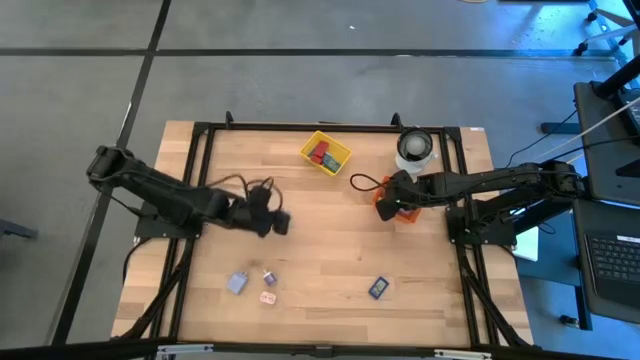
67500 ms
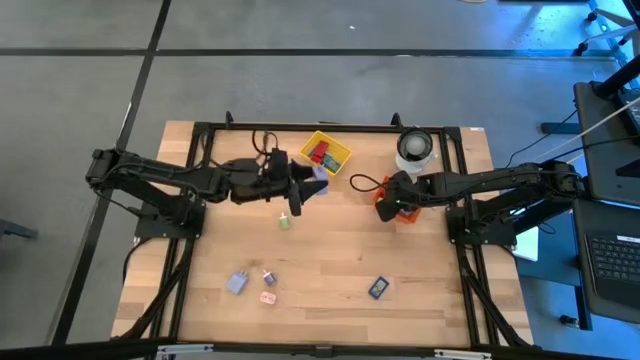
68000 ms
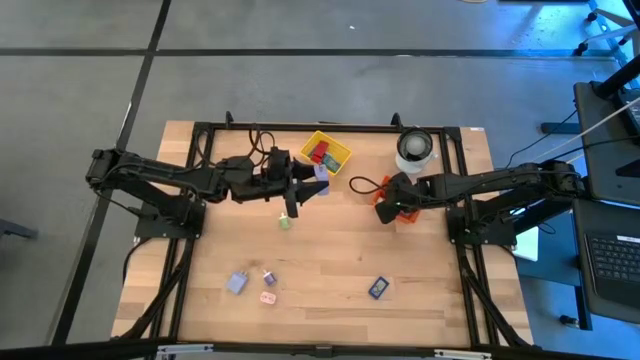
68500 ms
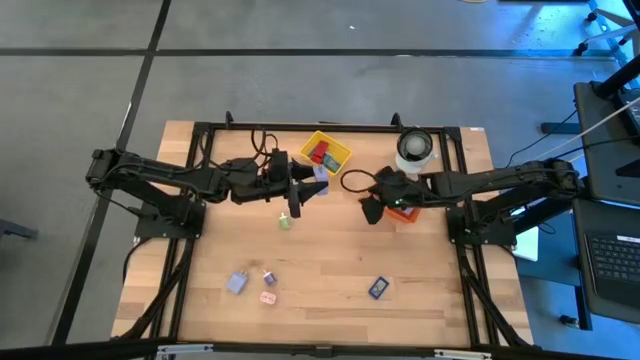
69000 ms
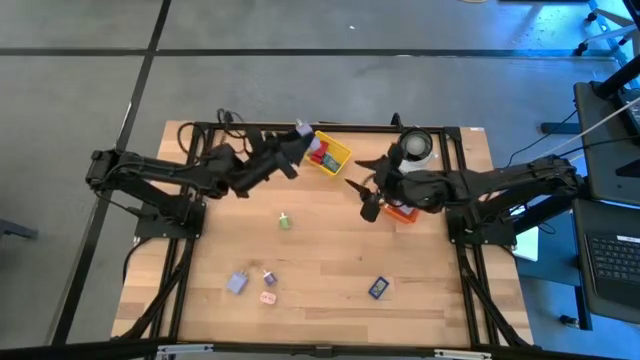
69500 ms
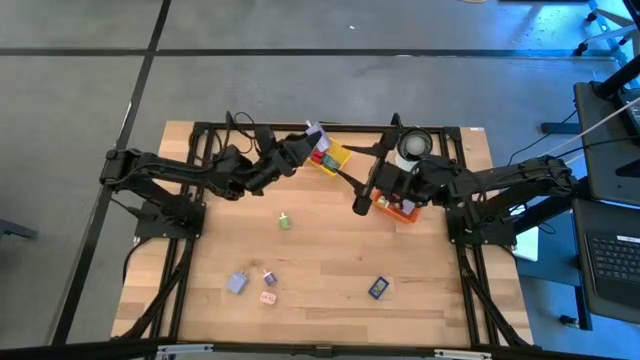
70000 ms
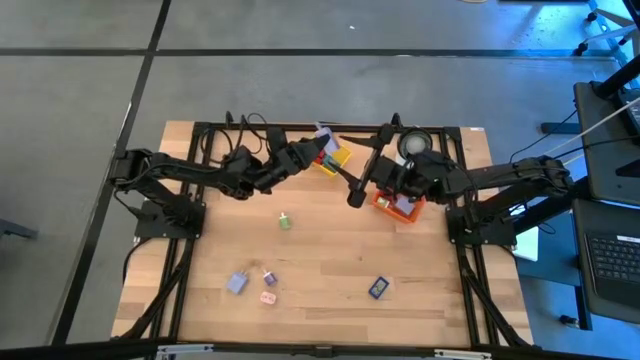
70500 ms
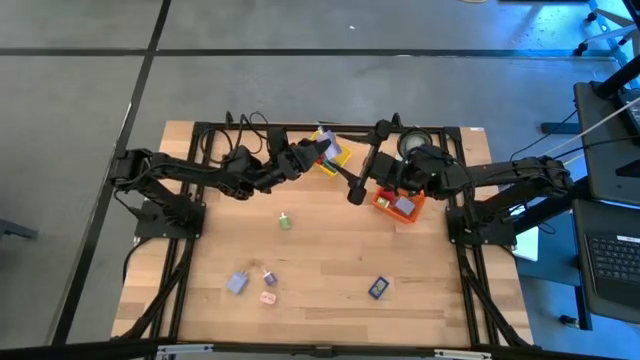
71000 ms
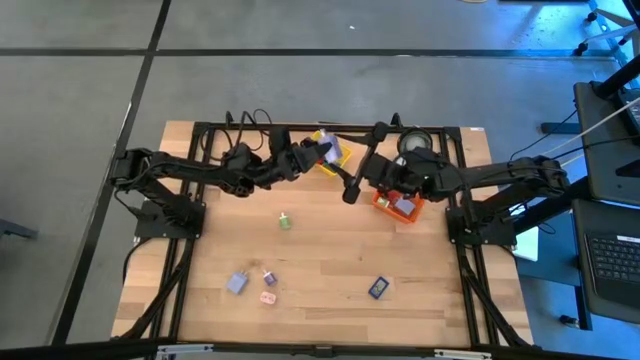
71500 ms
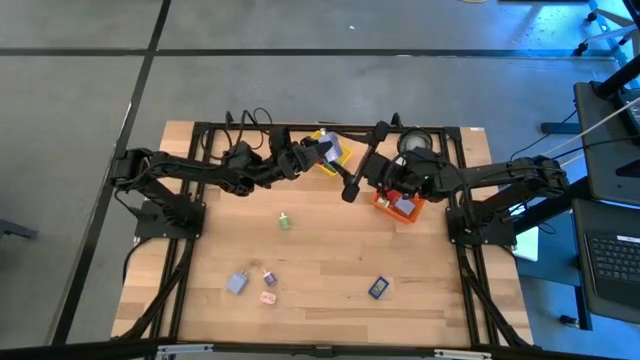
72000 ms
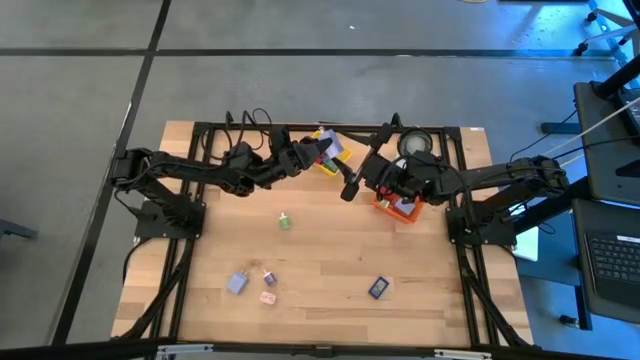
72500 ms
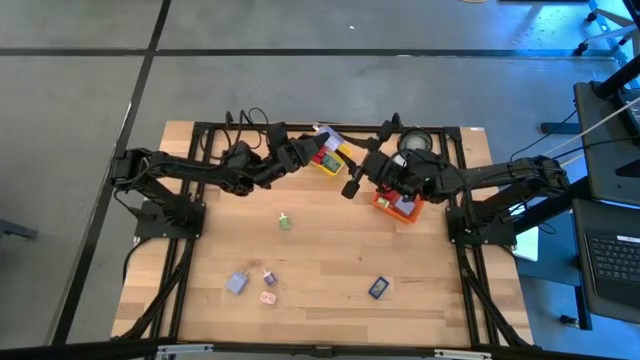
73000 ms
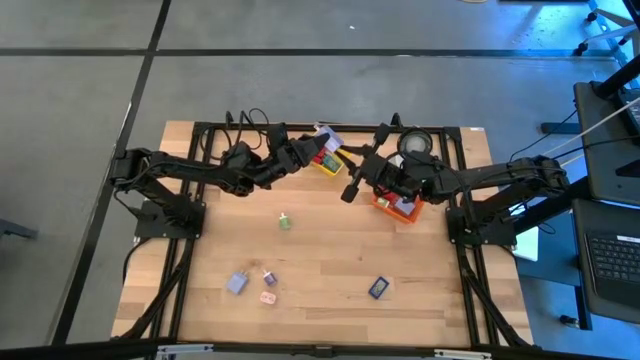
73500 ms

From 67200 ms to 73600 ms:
Task: Pick & Place Office items
Put the top purple charger adapter into the orange bin

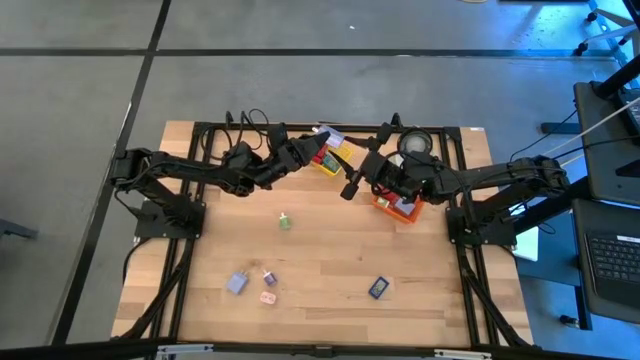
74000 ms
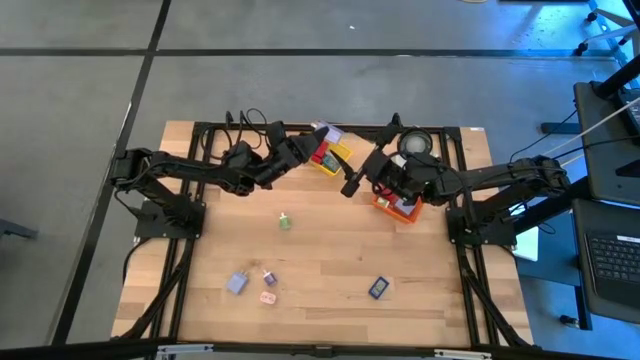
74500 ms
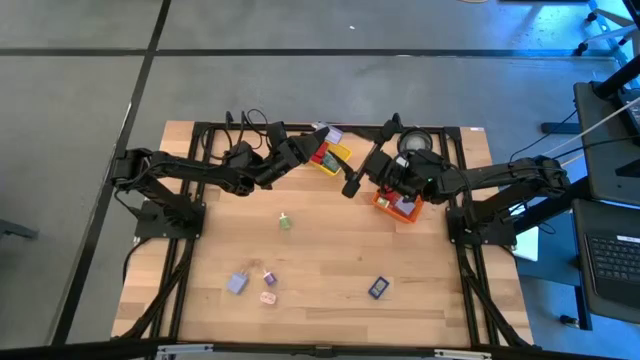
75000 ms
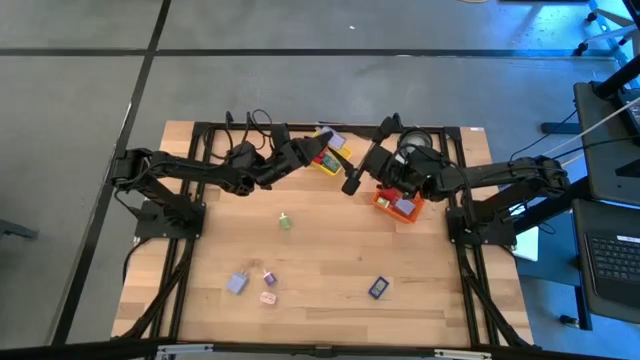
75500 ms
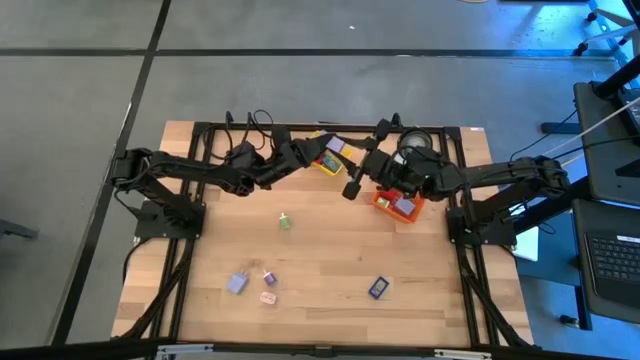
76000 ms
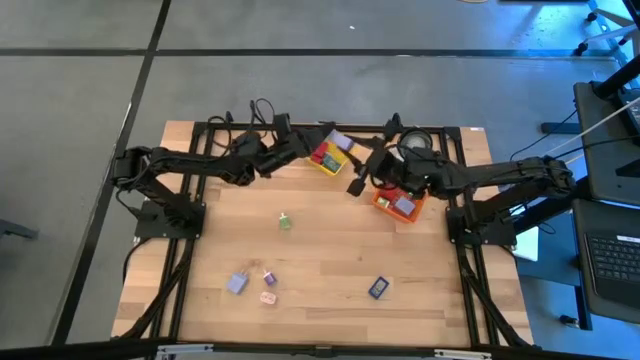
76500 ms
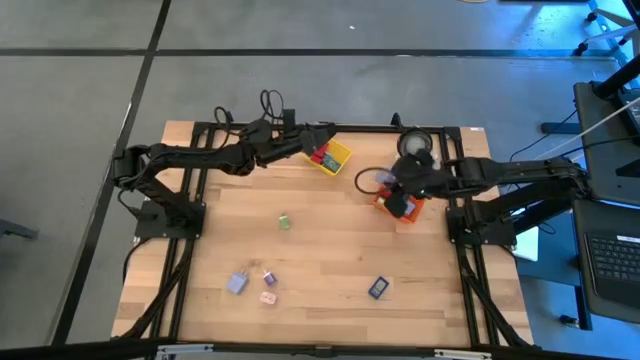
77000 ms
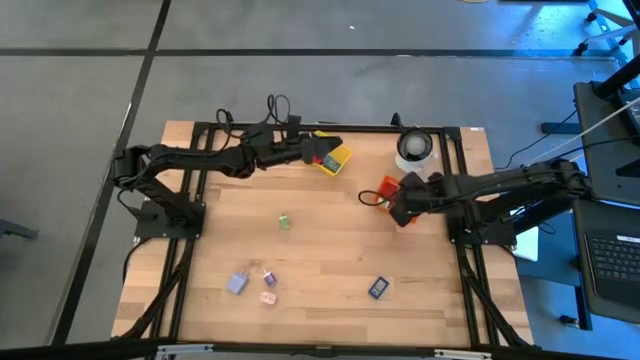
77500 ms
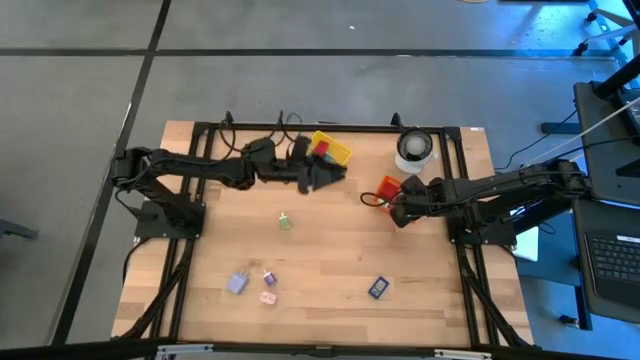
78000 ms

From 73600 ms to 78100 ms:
Put the top purple charger adapter into the orange bin

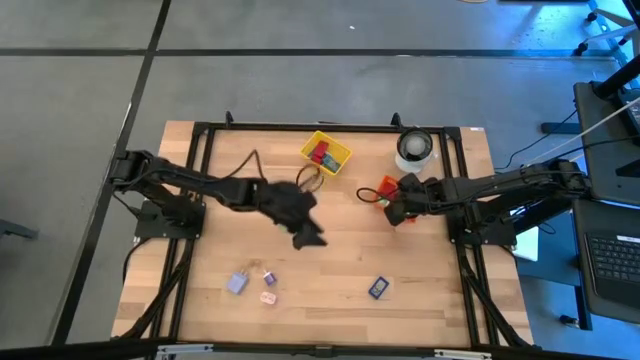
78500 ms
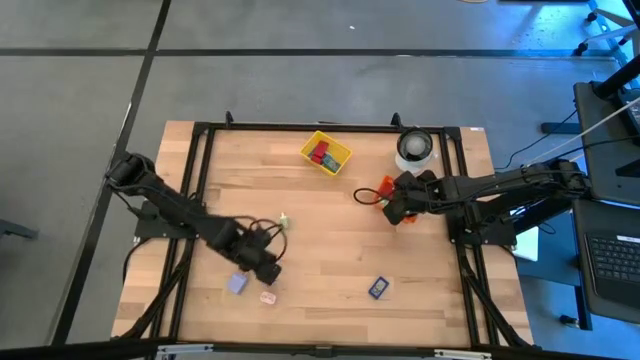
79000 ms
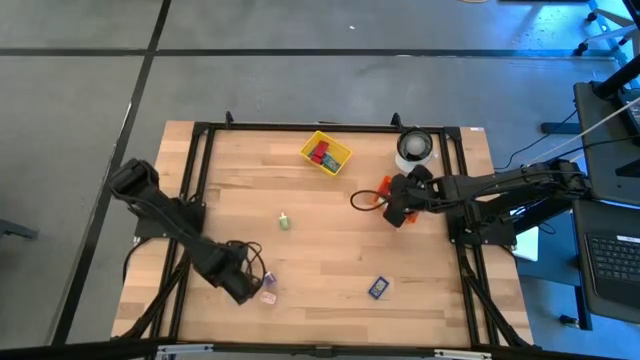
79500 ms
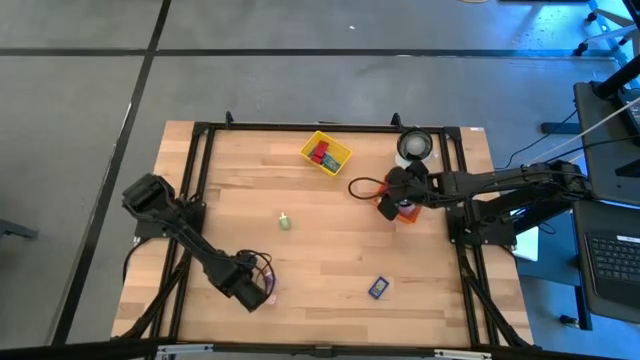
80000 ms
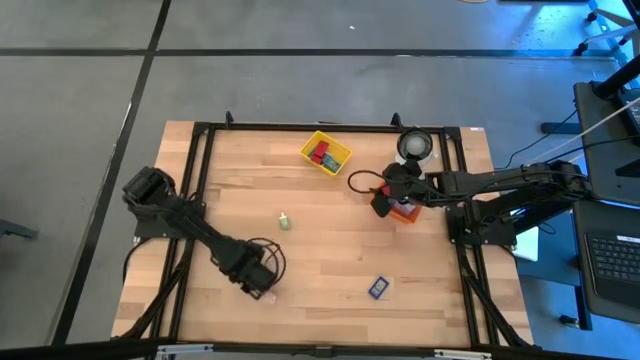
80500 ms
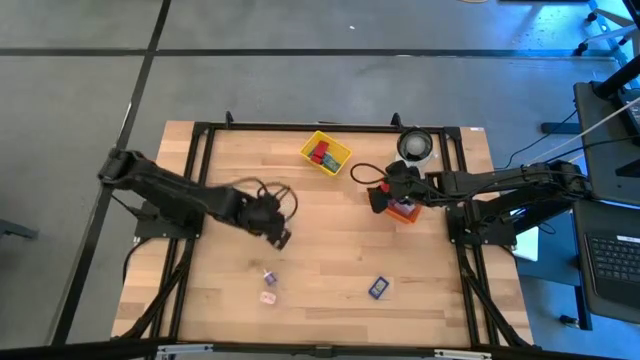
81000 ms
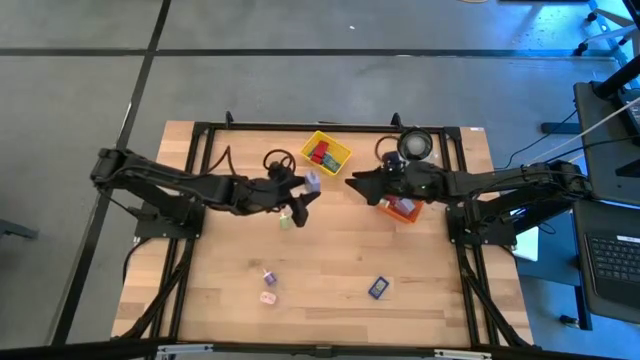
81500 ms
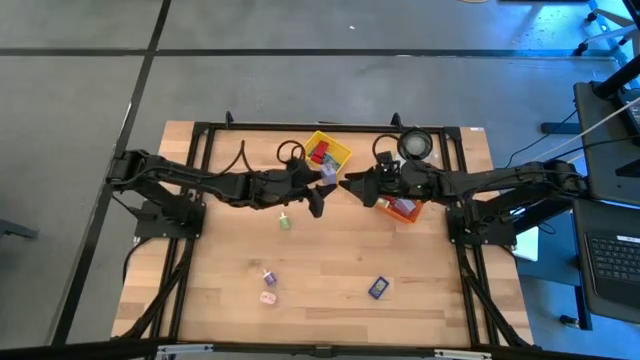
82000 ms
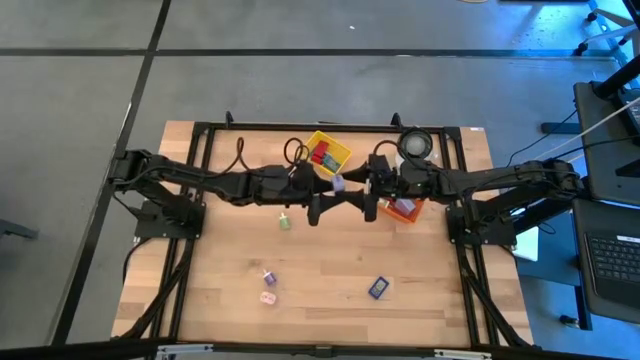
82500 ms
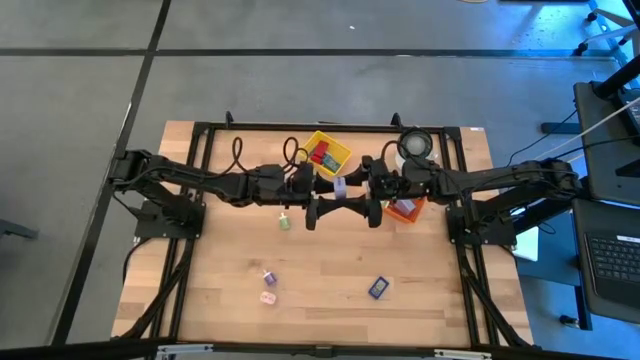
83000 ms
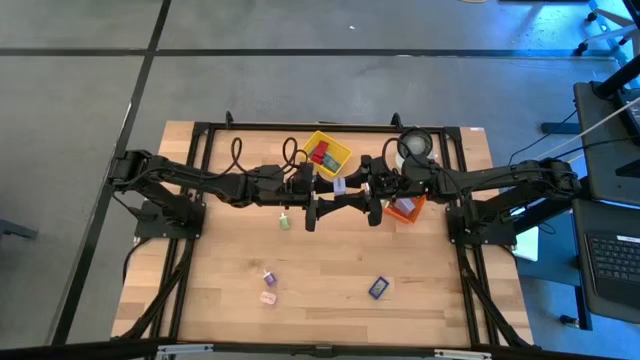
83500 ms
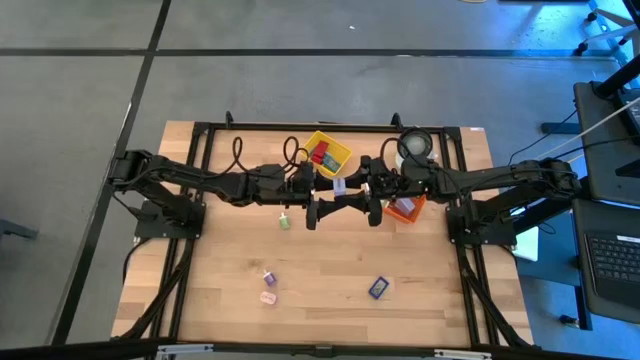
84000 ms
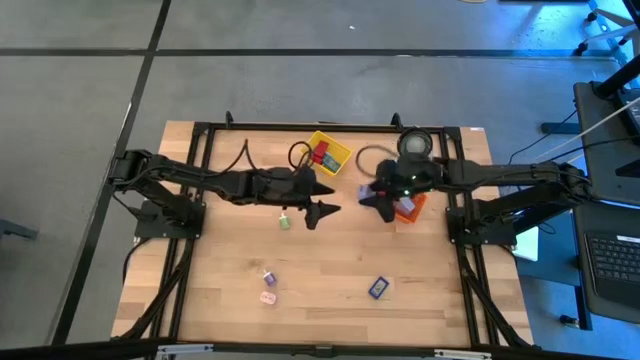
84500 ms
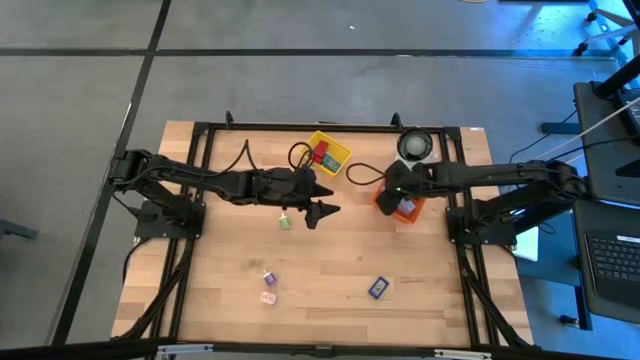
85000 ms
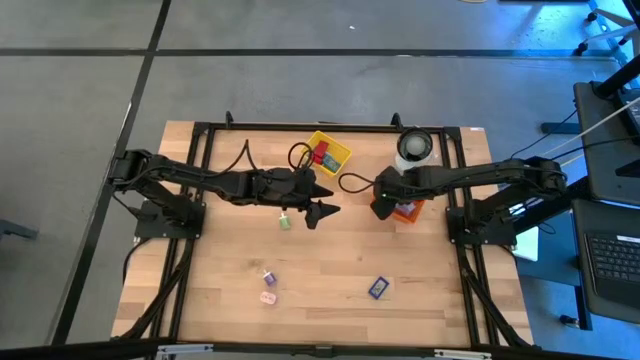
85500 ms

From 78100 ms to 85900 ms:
Put the purple charger adapter into the orange bin

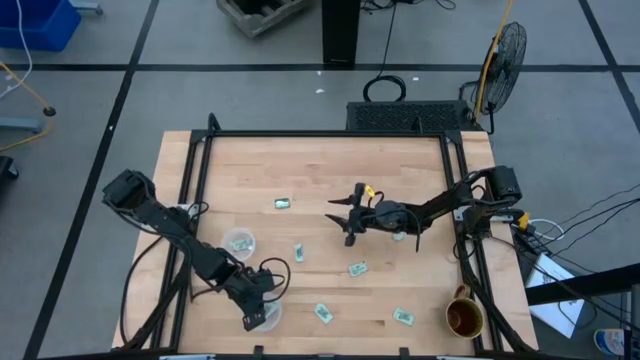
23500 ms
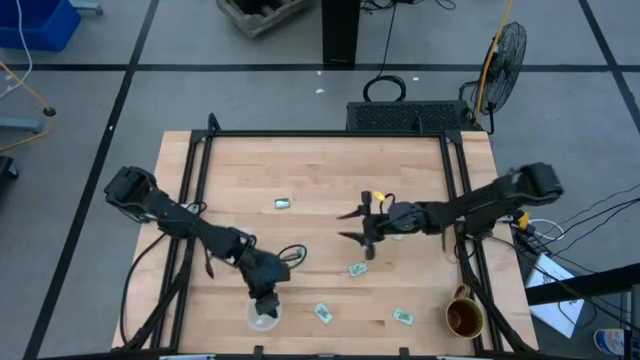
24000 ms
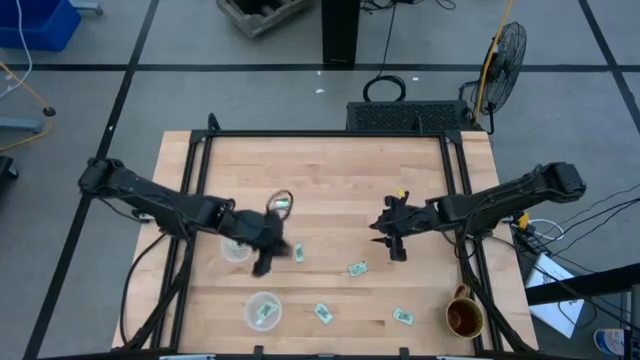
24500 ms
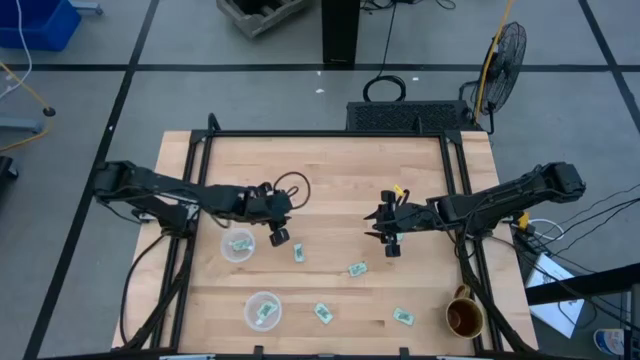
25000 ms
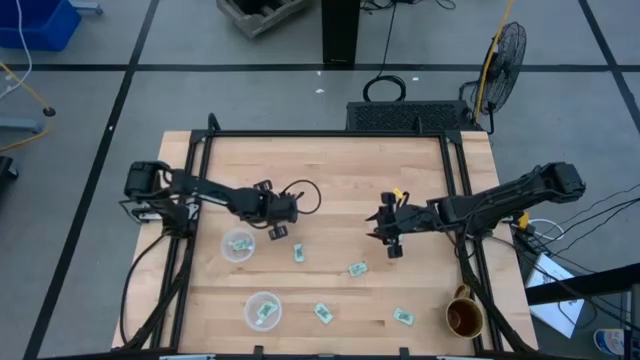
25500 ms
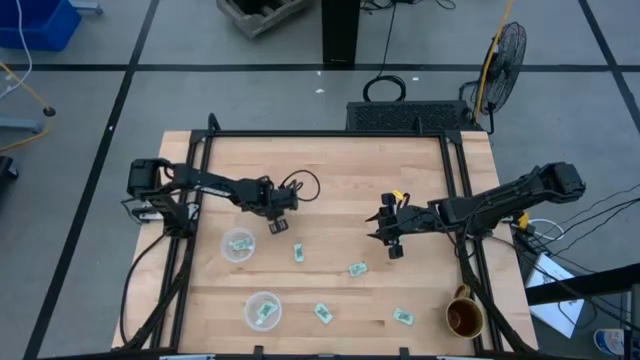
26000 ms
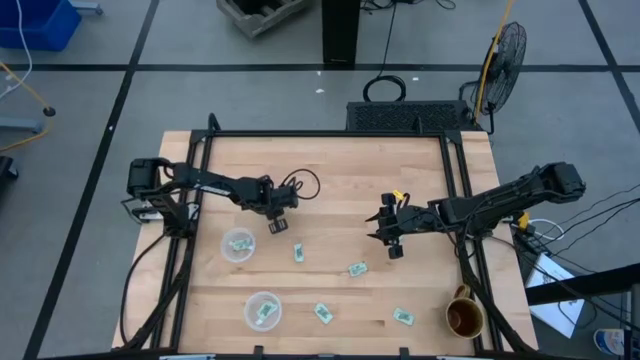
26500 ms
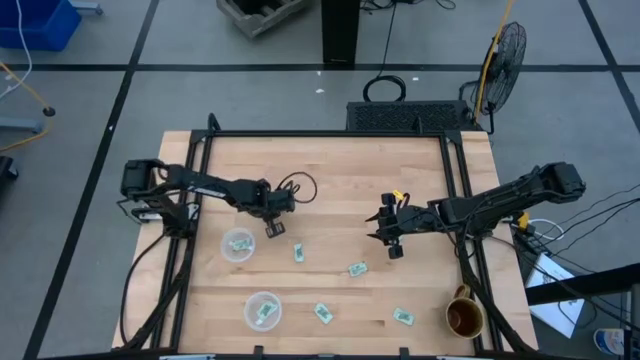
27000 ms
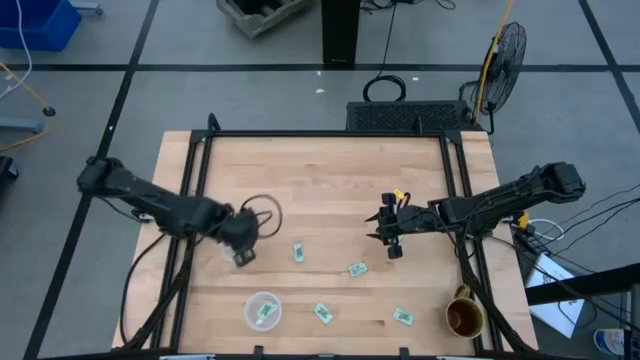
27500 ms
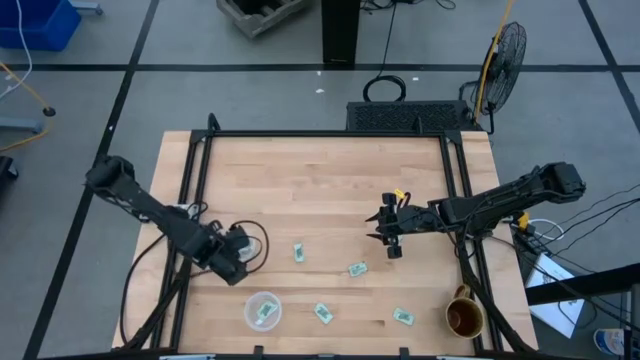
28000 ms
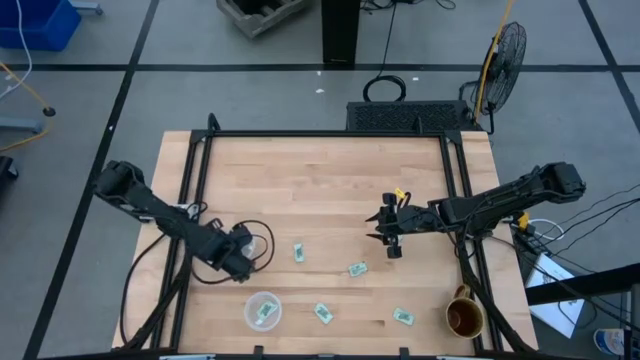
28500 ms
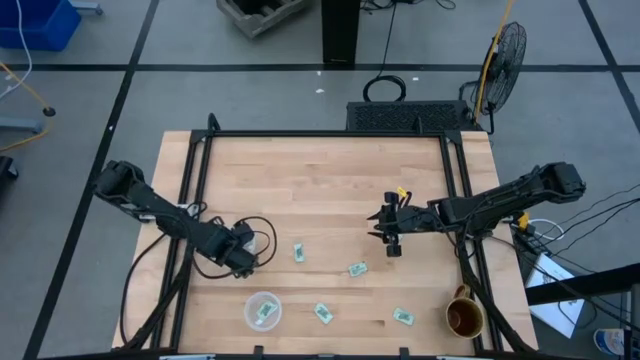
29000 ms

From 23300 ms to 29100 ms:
Task: Pick and place Stevia / Truvia into bins
Put the truvia packet into the top container
